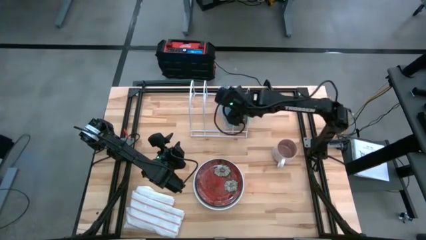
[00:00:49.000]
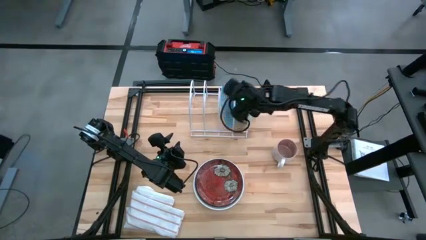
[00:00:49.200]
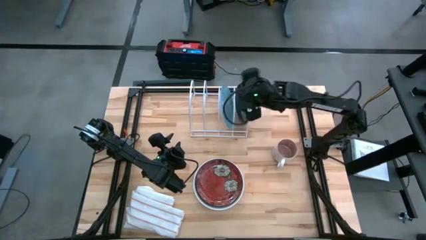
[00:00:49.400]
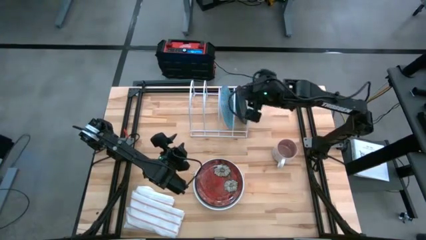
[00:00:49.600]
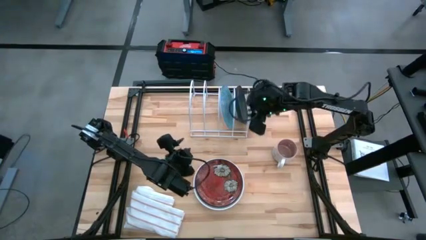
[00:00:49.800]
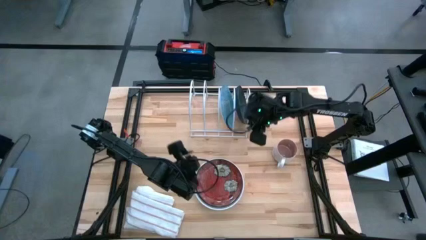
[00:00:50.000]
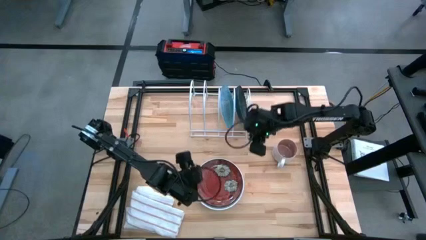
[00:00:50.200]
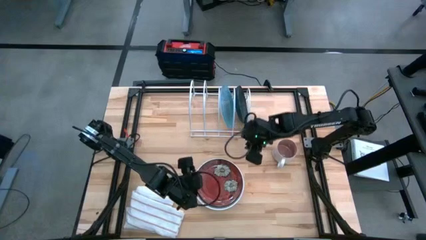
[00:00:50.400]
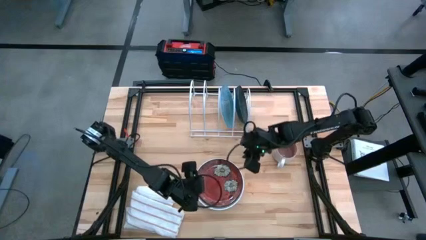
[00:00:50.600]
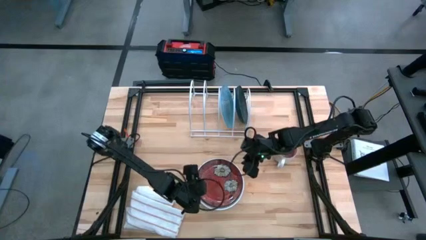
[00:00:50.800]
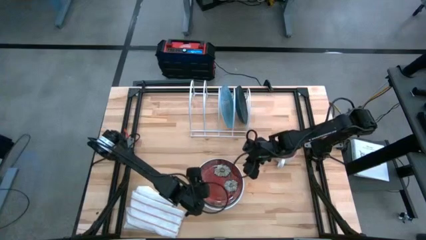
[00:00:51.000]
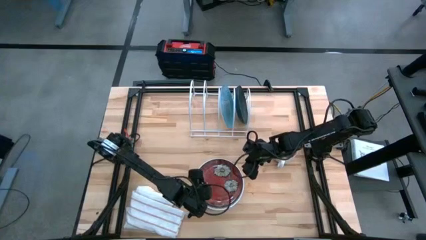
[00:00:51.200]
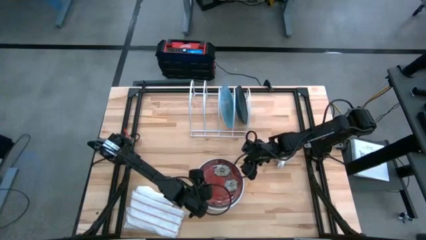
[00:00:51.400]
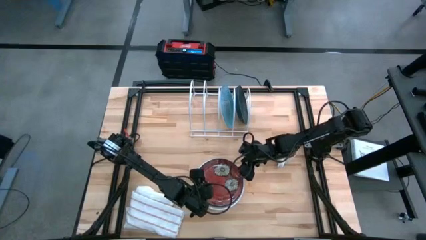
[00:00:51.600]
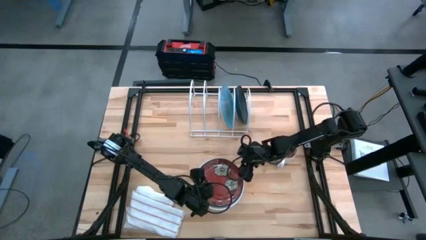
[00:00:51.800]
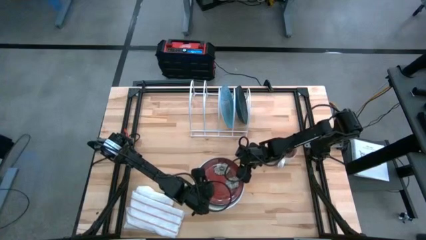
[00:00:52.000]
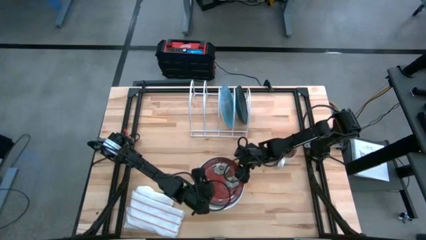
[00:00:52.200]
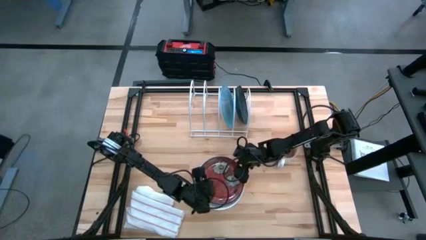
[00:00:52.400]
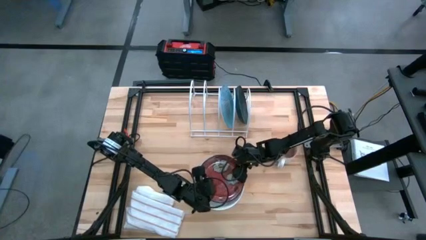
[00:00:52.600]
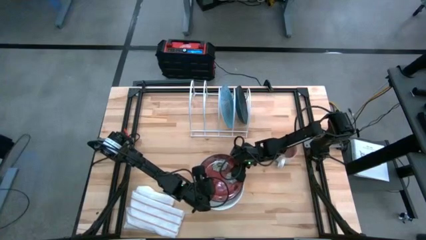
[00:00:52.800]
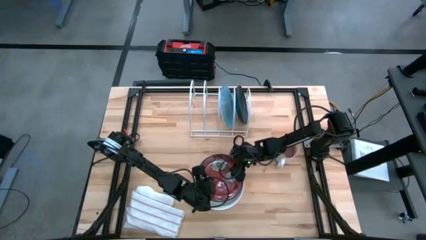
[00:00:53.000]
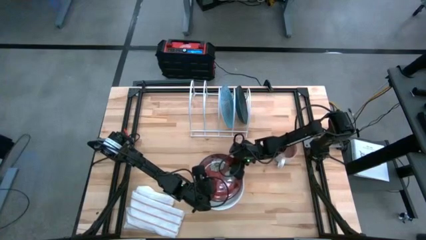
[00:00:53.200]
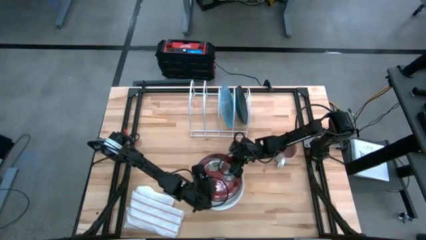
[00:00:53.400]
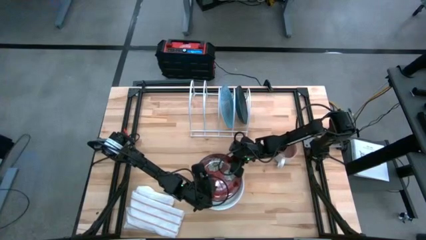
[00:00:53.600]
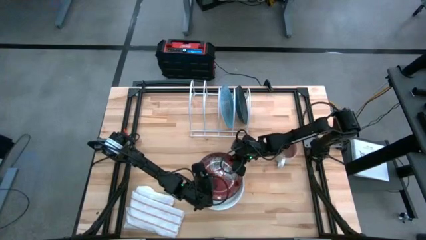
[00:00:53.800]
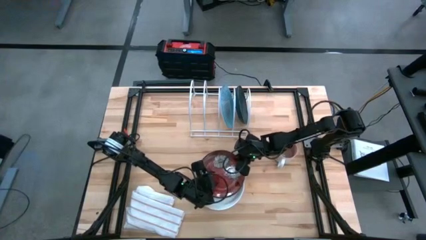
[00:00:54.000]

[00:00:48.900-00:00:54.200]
Task: Sort dishes
Put the red plate in the dish rack

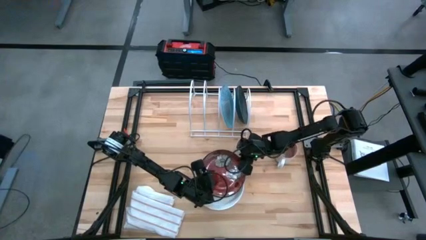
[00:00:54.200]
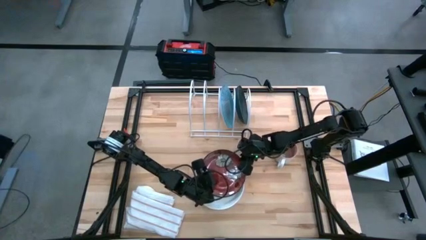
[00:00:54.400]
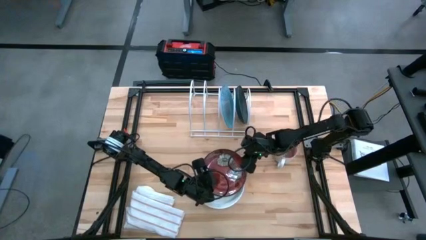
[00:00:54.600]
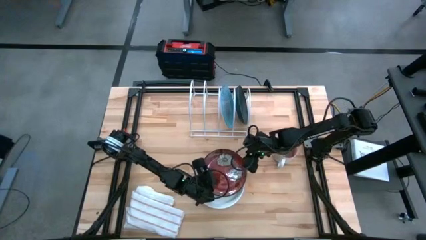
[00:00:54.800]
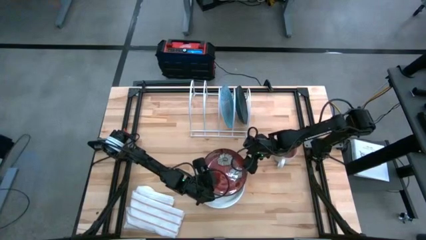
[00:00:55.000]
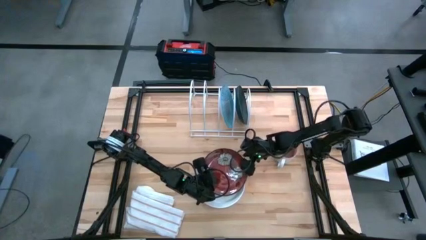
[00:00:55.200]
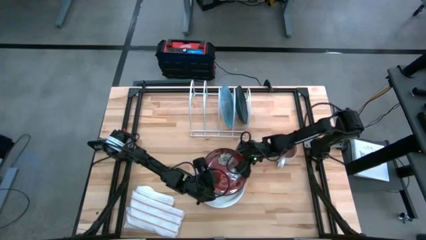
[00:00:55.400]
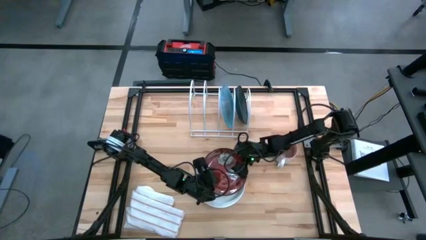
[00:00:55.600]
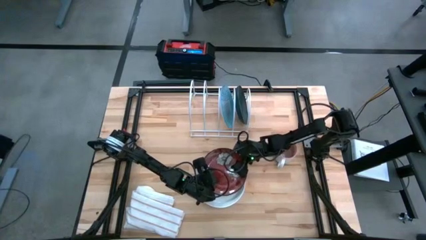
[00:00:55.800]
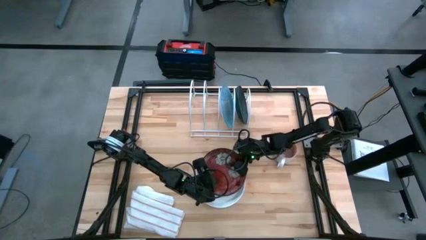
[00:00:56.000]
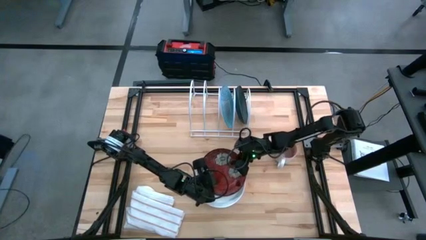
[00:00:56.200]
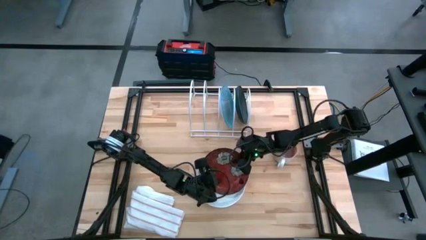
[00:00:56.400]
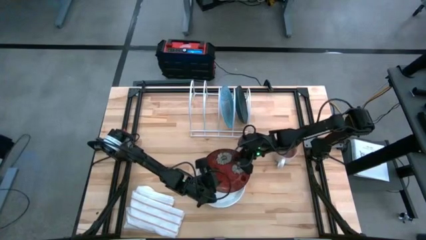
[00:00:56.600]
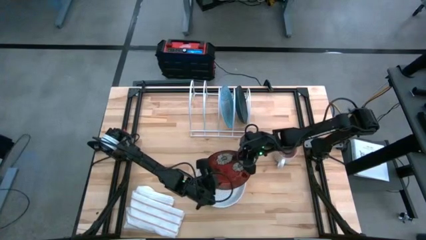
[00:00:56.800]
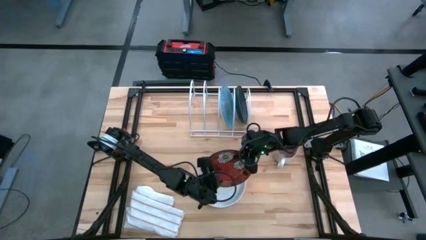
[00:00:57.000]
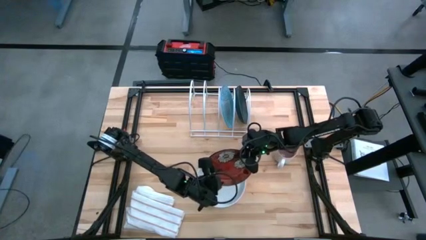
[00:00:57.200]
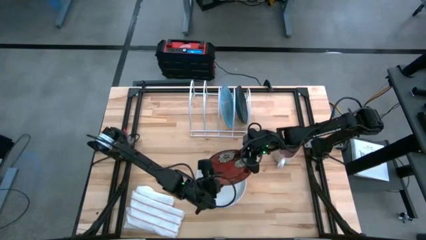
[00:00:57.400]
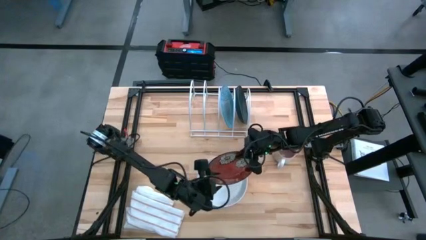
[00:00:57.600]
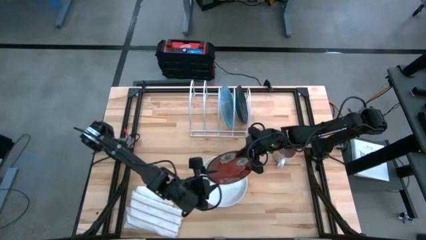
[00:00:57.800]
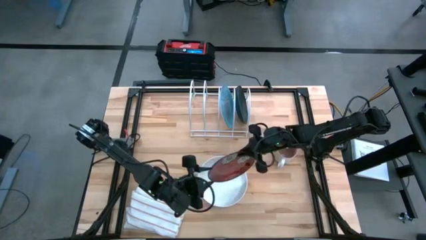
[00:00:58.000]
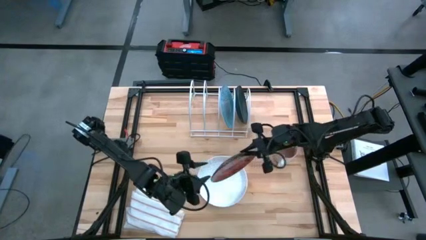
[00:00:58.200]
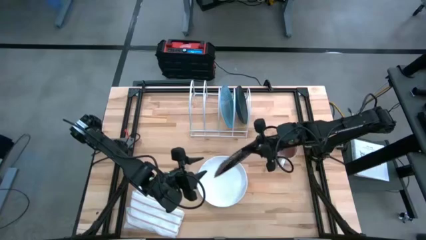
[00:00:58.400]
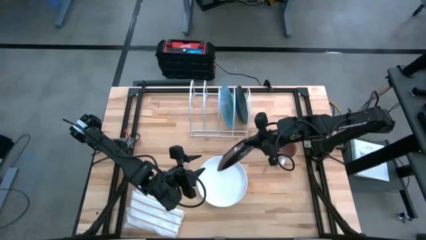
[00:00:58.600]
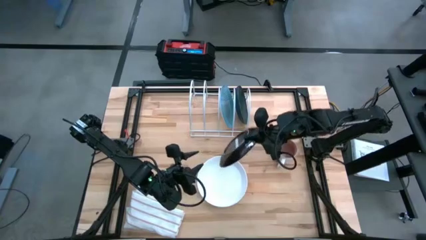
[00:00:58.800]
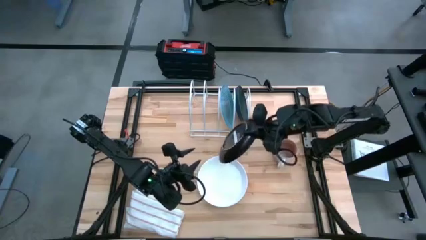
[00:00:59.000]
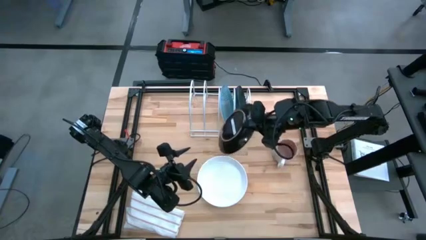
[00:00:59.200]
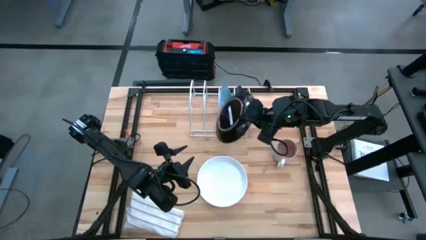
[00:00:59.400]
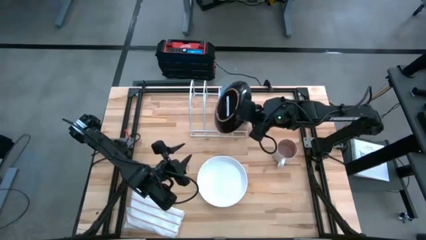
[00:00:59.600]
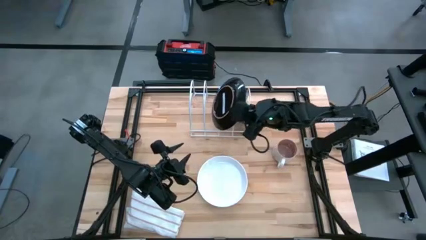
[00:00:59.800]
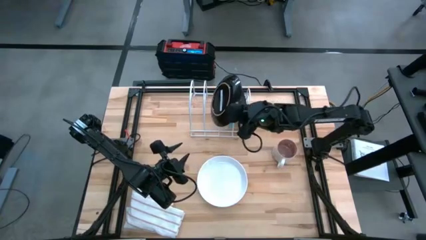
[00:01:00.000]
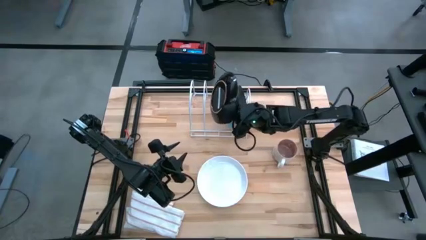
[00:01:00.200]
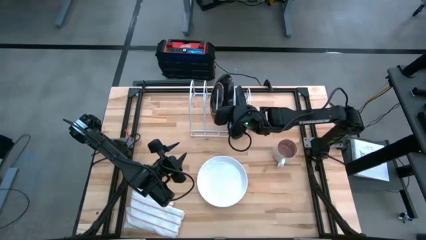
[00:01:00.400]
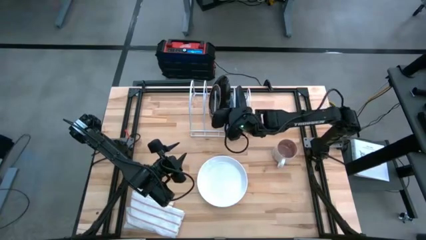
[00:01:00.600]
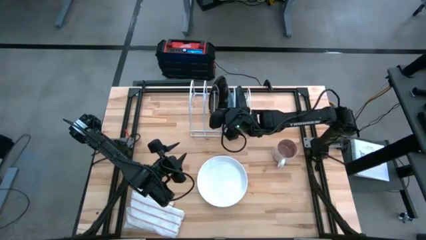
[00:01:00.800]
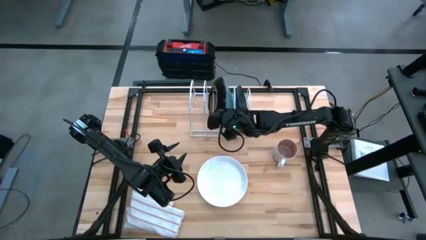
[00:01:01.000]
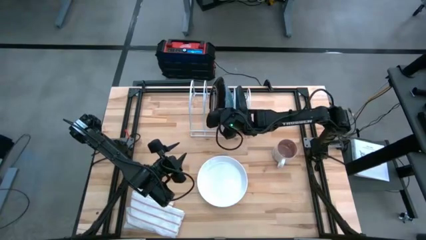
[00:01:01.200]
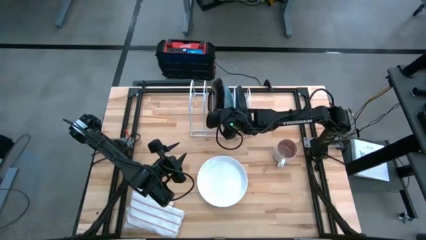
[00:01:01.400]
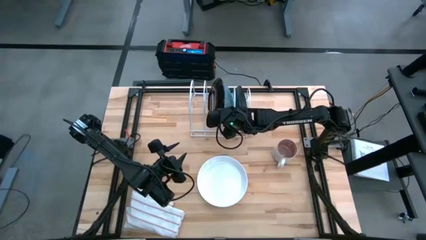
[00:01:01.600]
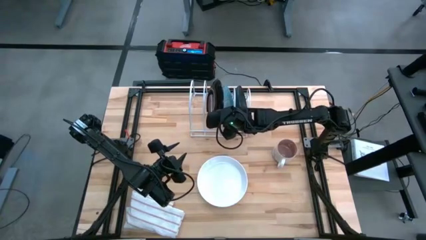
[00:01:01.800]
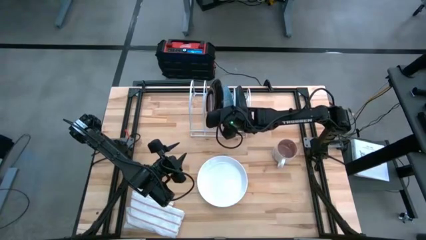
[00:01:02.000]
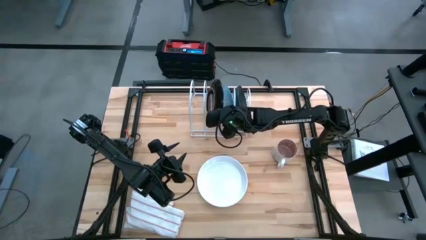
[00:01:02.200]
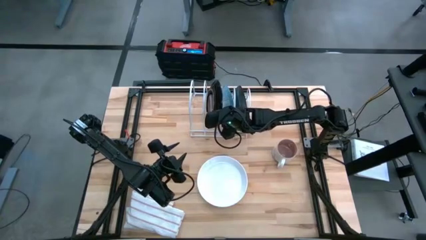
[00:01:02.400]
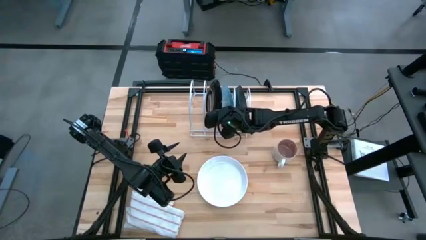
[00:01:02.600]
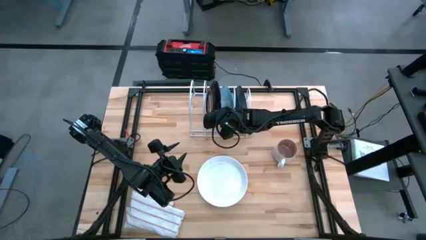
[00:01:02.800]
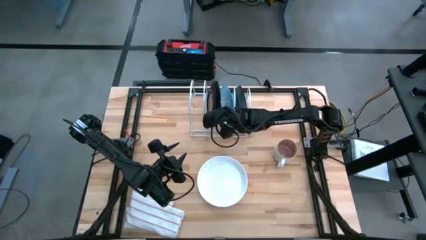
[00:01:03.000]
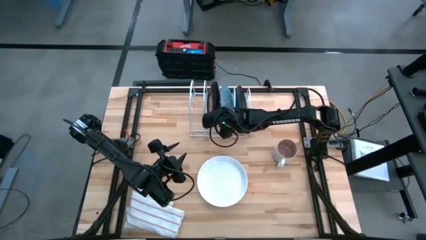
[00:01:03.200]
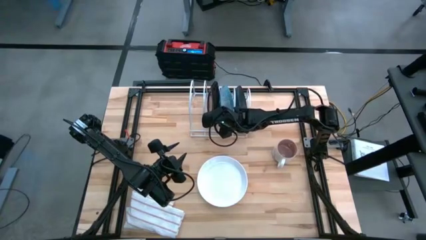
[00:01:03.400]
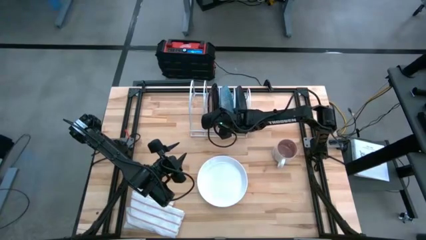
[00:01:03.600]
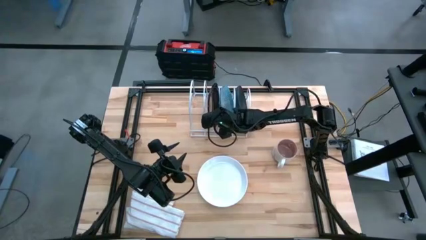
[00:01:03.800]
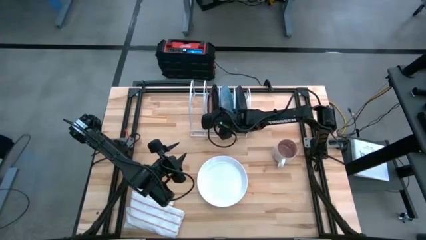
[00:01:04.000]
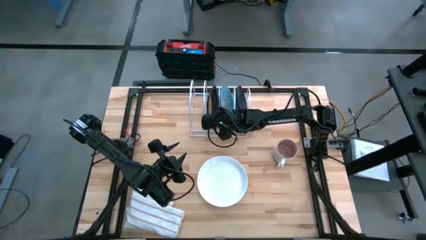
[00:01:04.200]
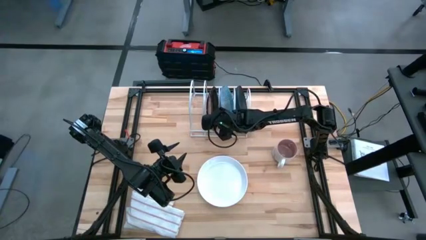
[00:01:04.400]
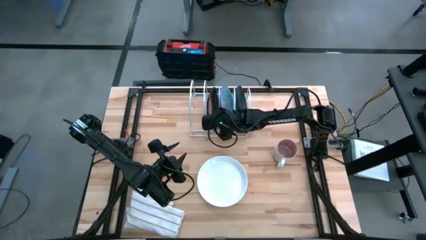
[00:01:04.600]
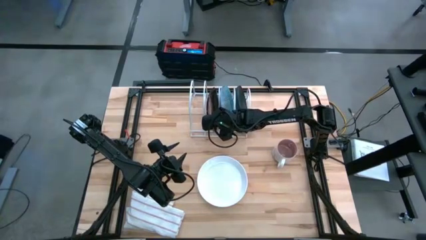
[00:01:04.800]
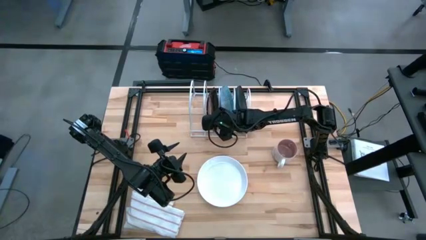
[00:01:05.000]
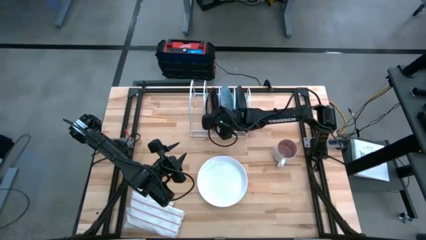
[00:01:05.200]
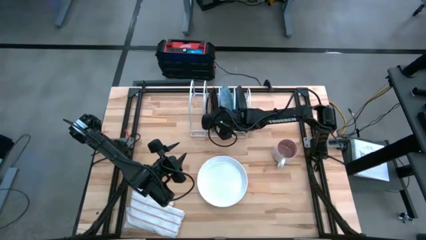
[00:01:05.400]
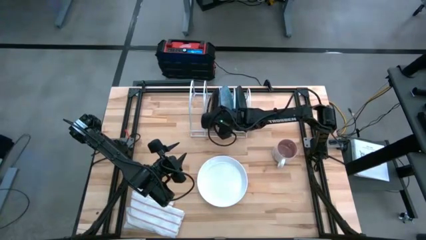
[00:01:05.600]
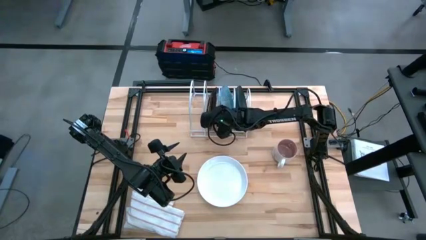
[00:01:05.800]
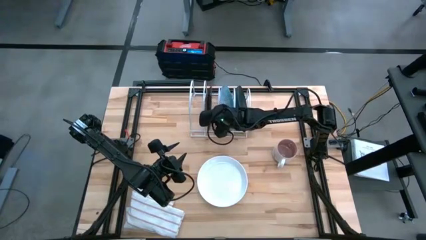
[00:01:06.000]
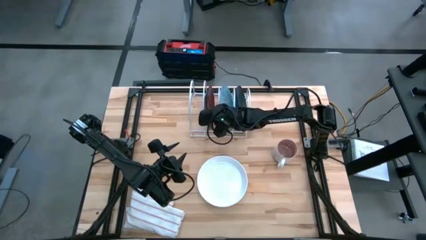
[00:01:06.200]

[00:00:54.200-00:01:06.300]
Put the red plate in the dish rack
